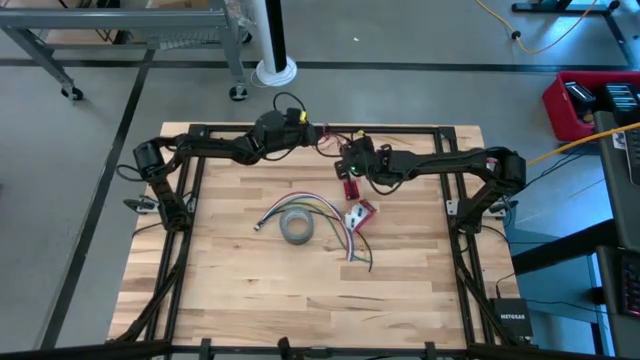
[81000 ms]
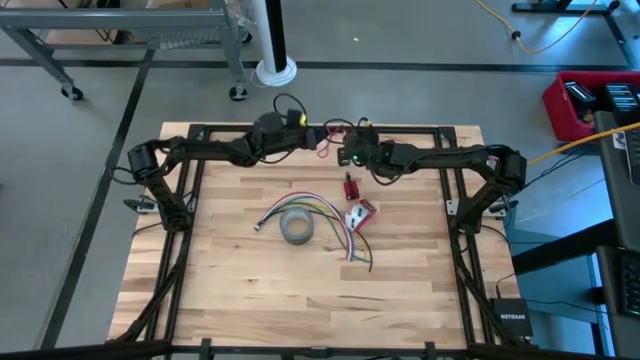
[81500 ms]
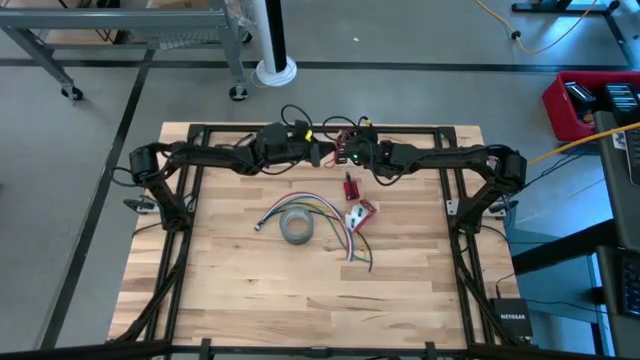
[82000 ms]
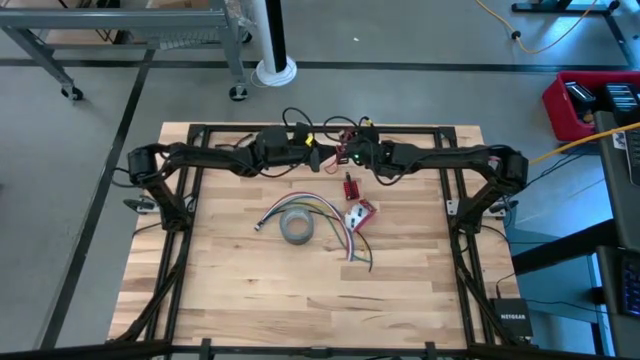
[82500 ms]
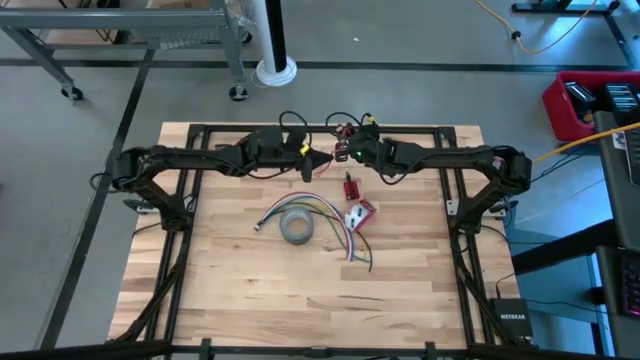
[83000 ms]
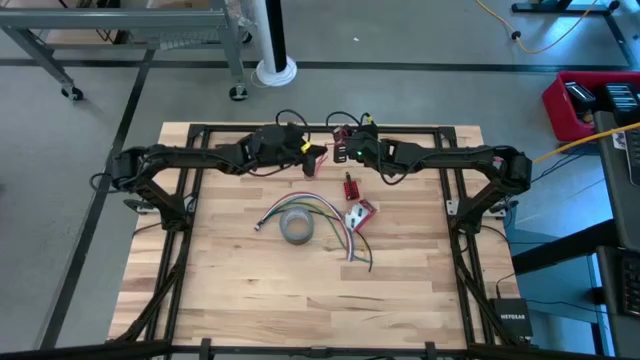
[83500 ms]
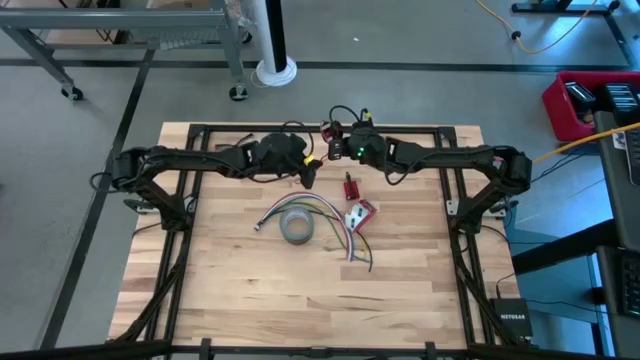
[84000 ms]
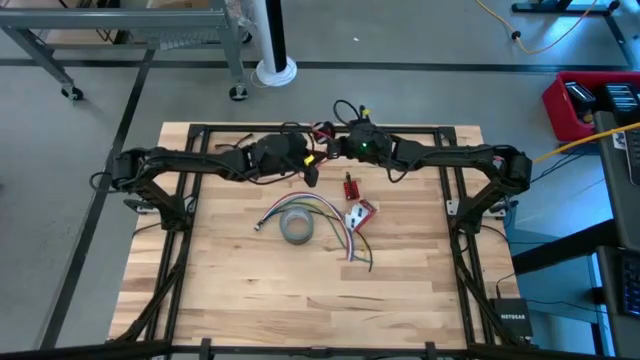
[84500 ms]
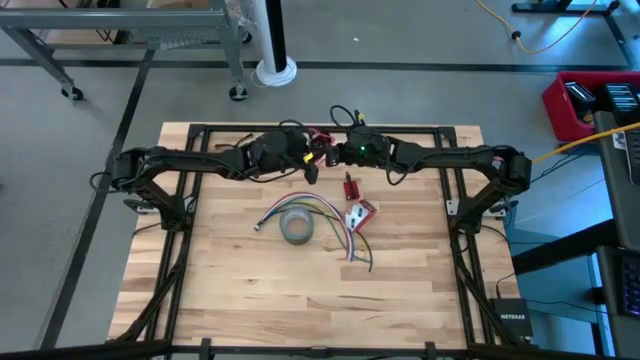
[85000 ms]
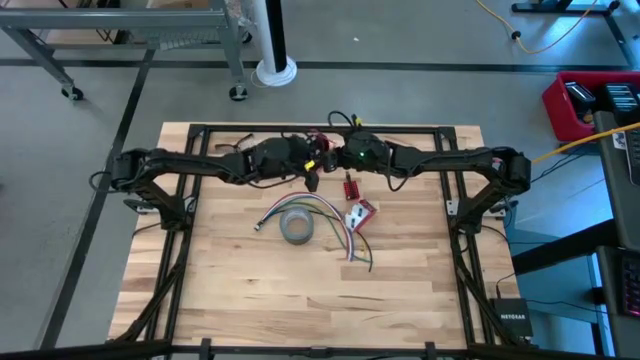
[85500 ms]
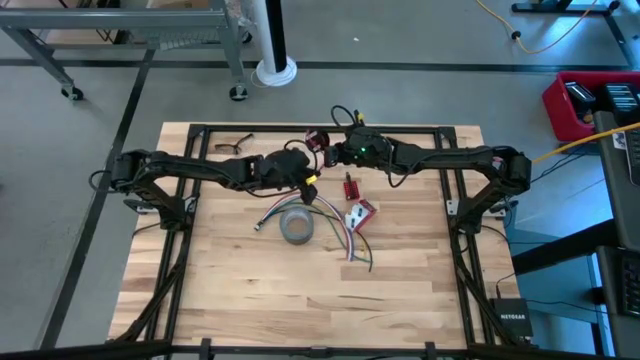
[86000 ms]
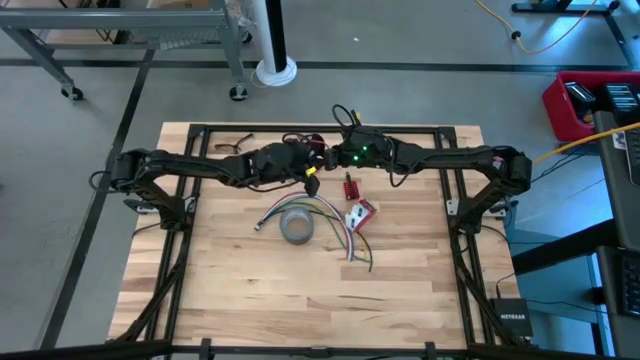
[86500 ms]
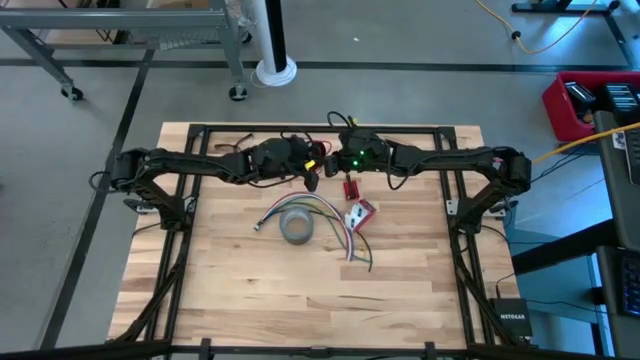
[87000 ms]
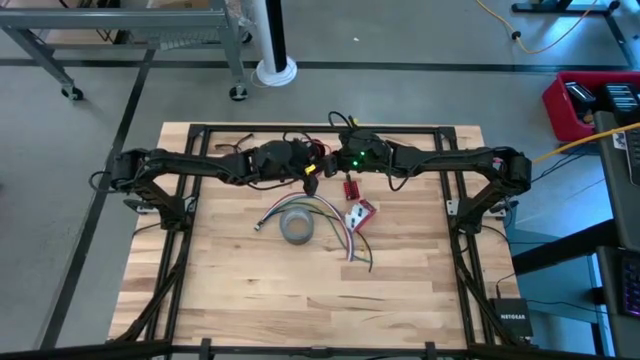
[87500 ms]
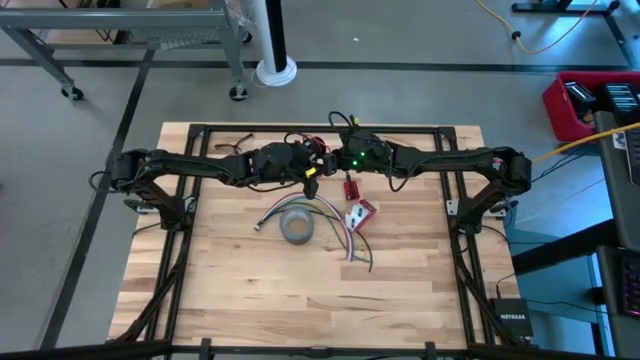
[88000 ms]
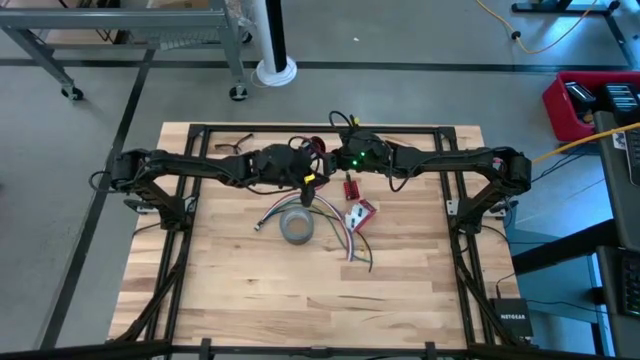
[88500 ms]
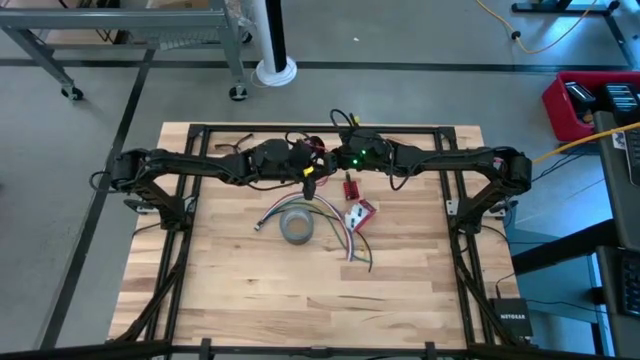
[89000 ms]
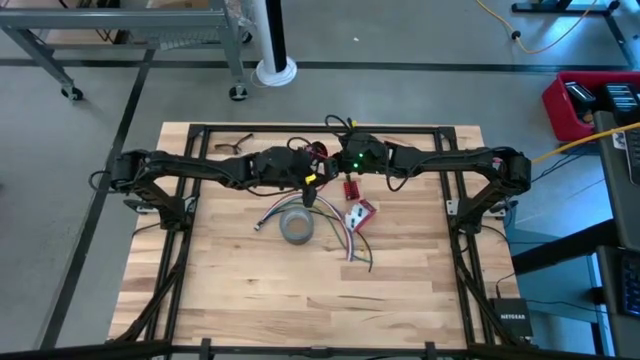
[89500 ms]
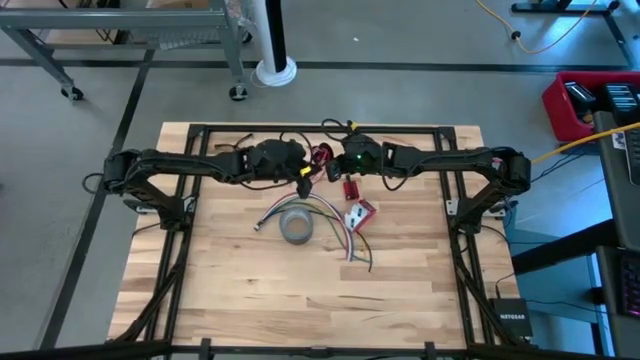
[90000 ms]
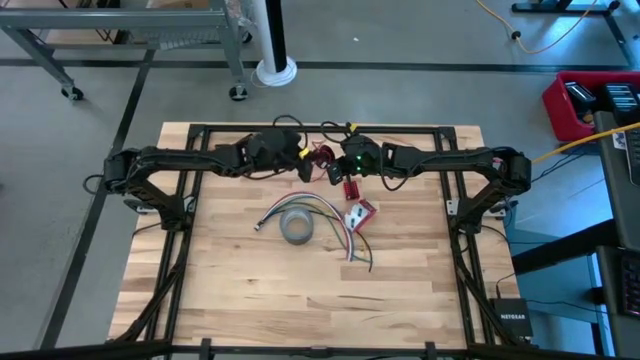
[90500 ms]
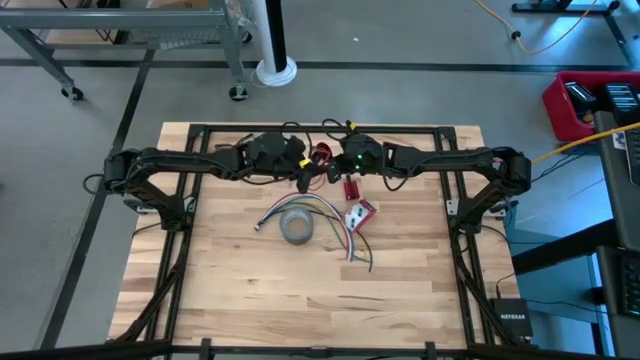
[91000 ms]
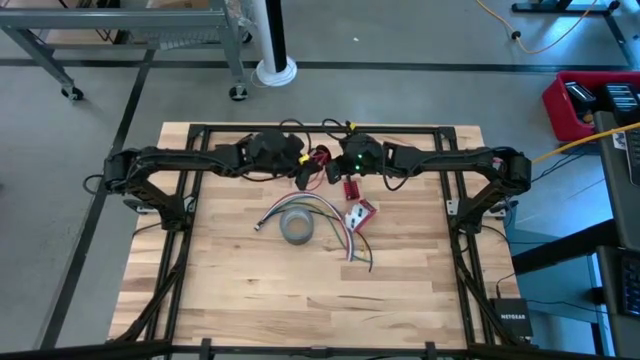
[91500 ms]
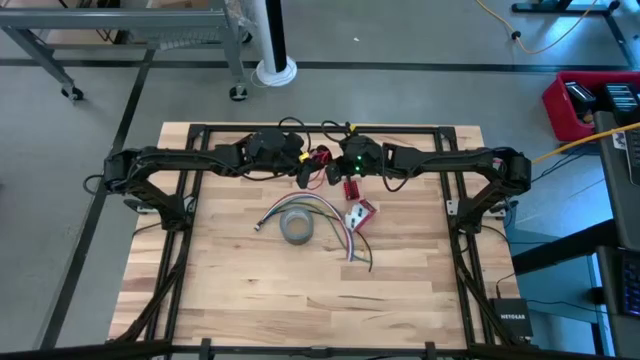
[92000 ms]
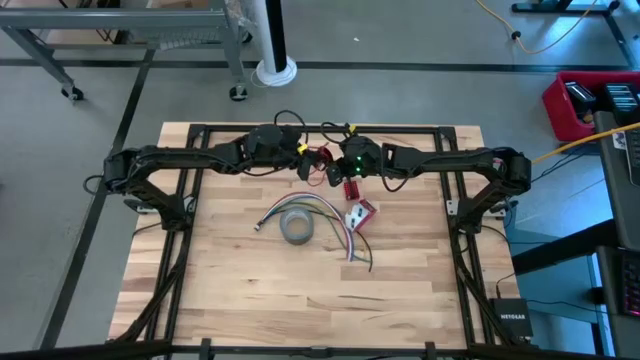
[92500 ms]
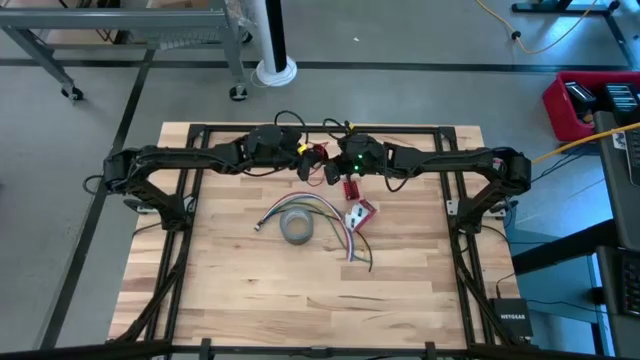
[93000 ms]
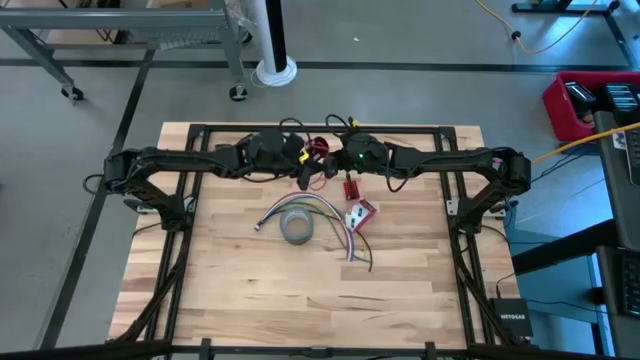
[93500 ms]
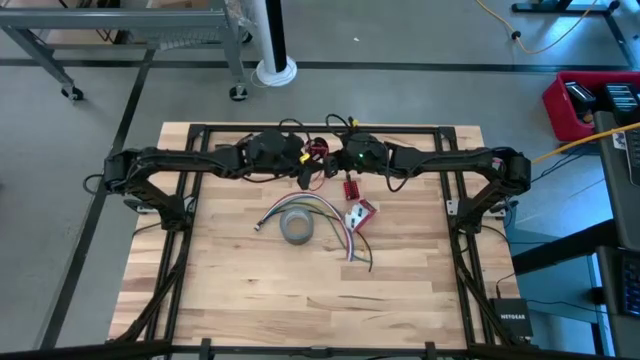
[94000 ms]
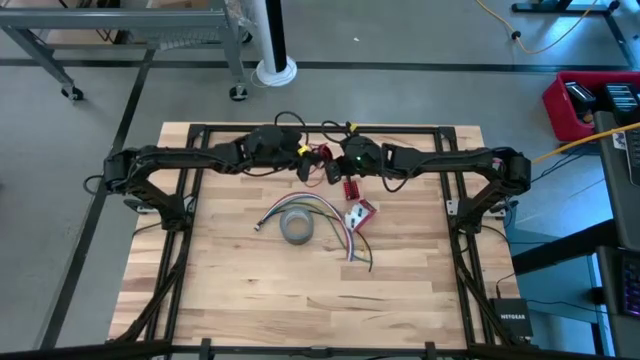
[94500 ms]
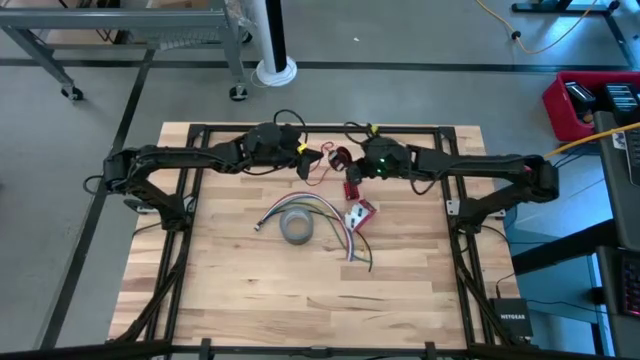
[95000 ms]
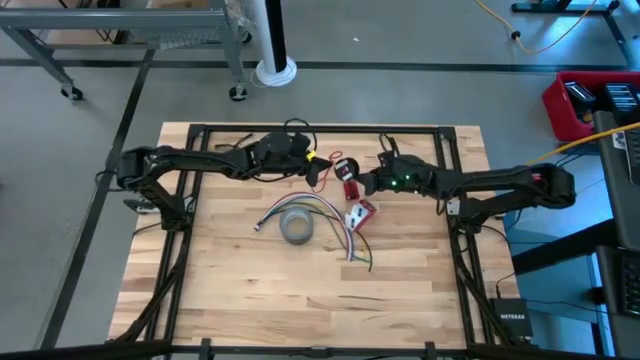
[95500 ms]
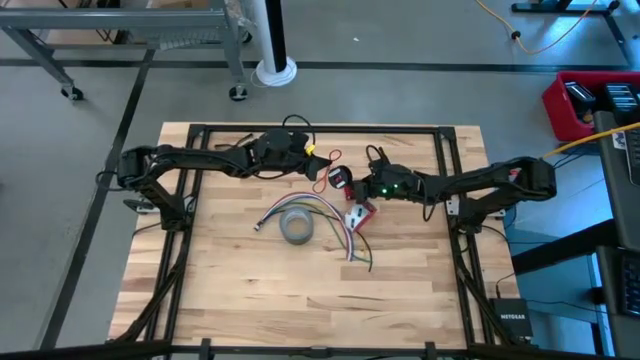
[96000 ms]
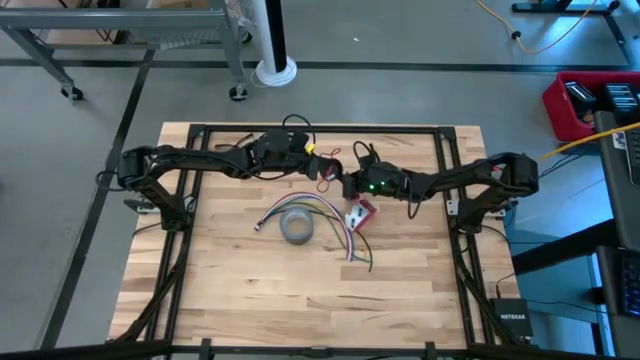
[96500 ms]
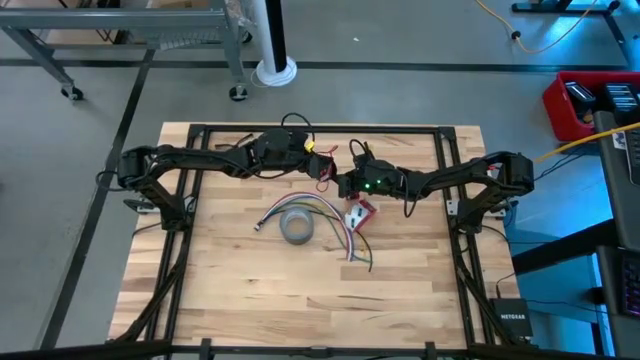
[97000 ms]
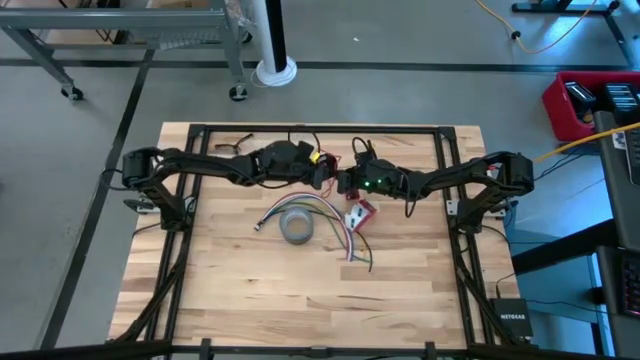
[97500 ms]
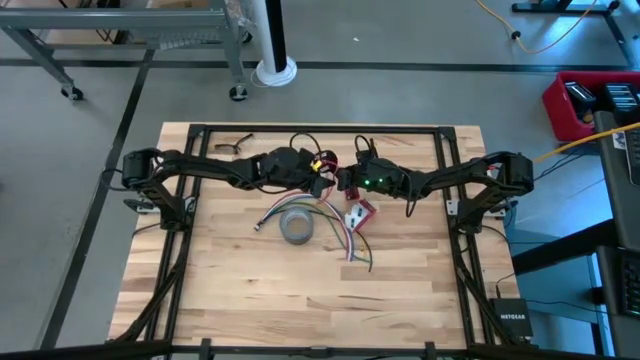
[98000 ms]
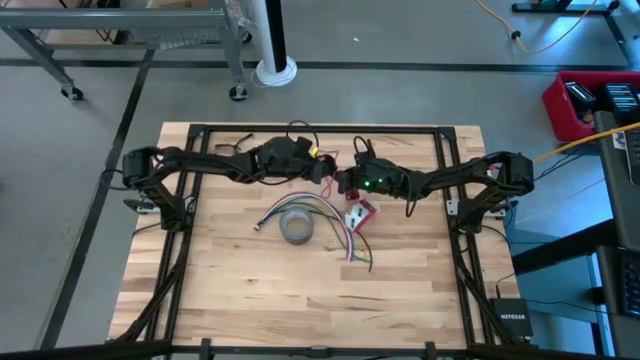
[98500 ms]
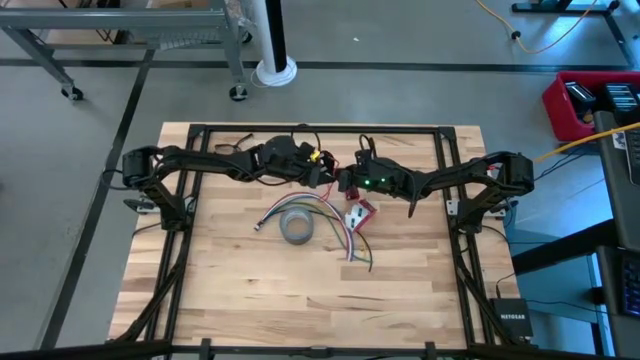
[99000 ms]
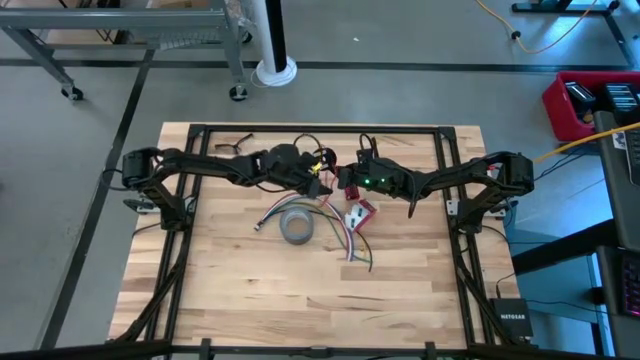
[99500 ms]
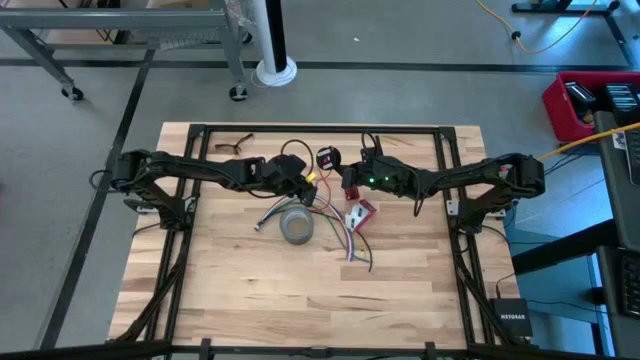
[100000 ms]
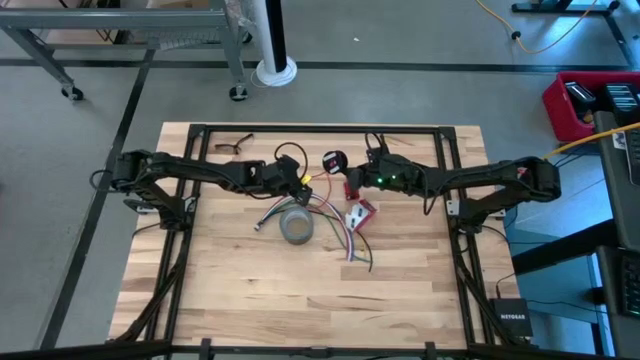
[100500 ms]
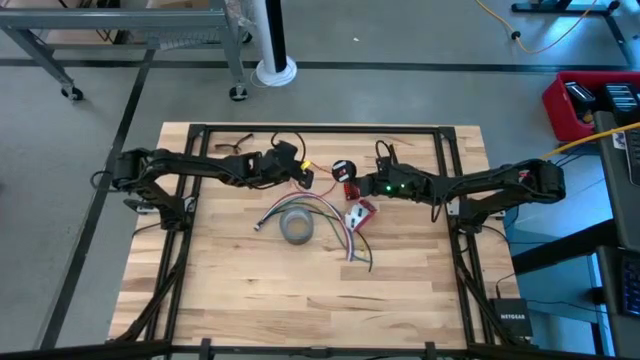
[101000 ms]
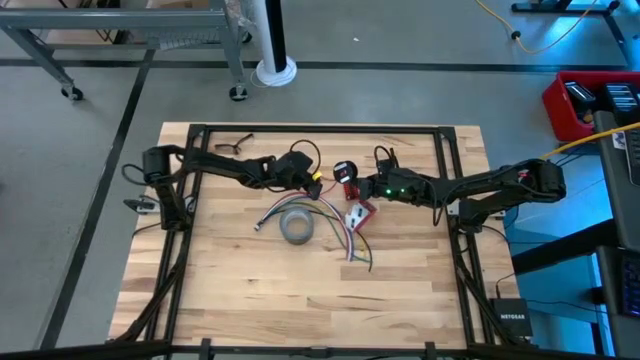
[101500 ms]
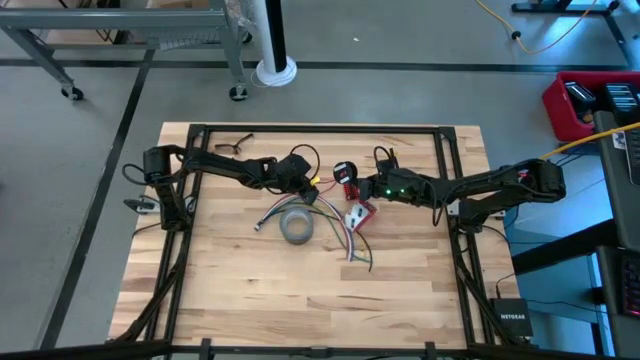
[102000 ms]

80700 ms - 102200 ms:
Task: Coil cords
Coil the red wire on the black spool
